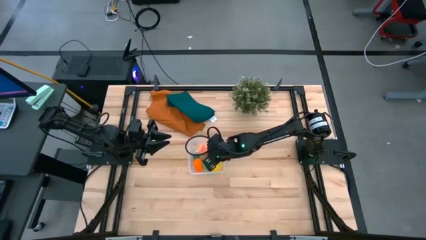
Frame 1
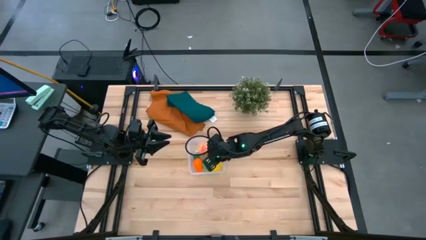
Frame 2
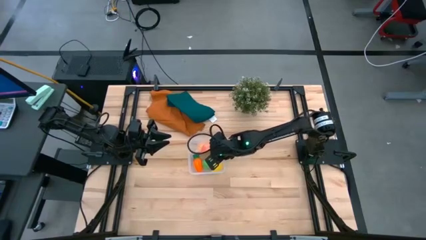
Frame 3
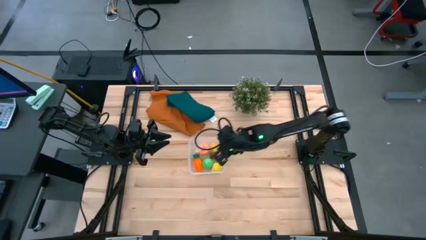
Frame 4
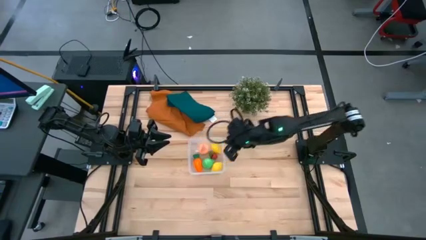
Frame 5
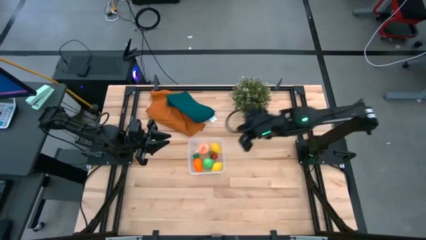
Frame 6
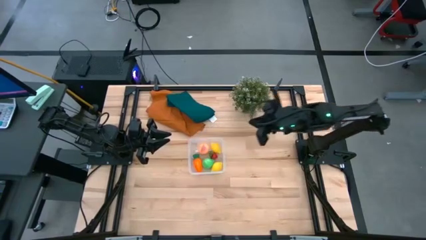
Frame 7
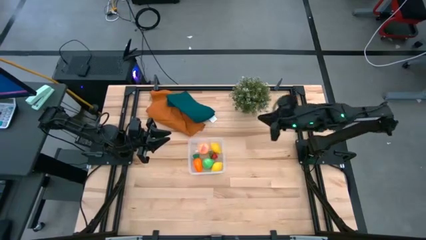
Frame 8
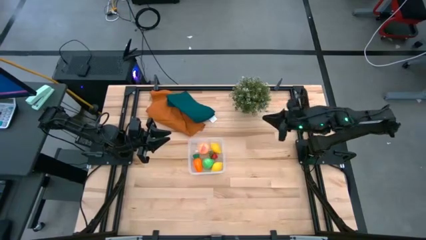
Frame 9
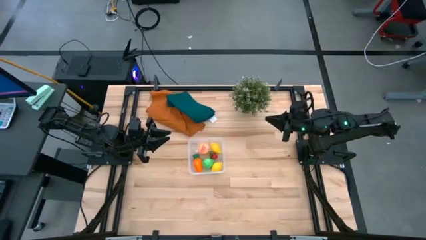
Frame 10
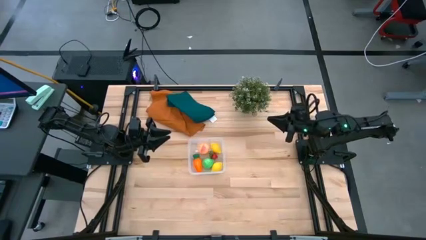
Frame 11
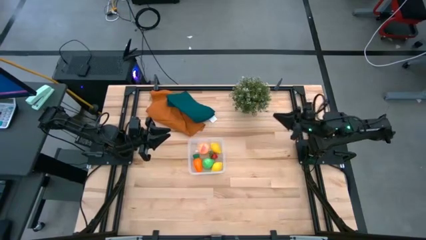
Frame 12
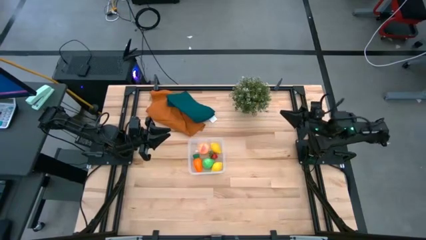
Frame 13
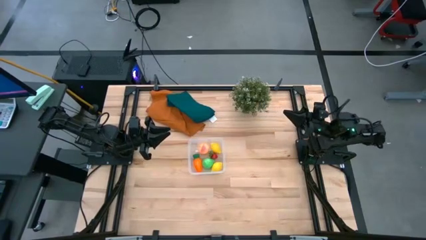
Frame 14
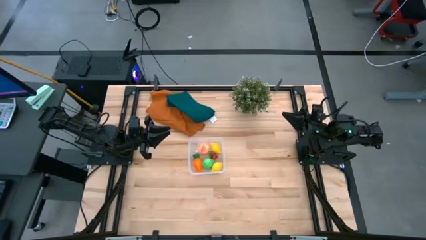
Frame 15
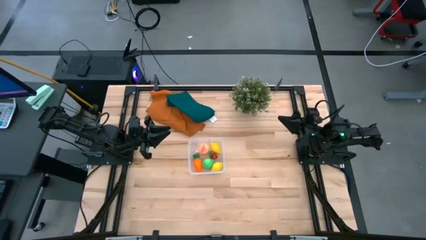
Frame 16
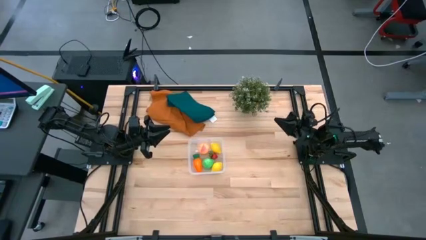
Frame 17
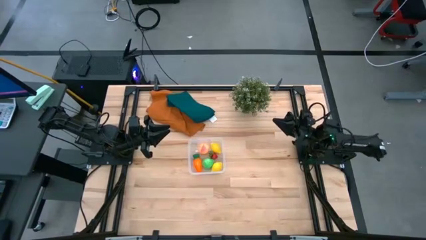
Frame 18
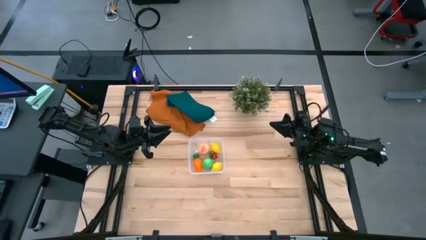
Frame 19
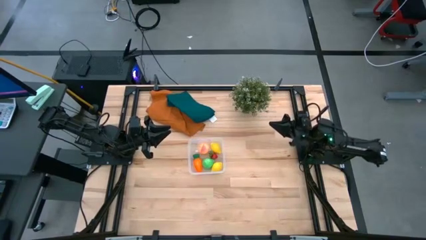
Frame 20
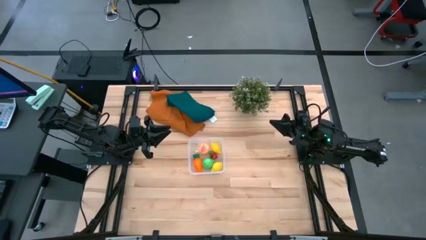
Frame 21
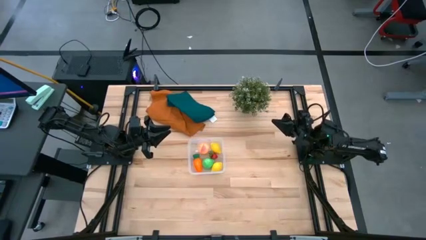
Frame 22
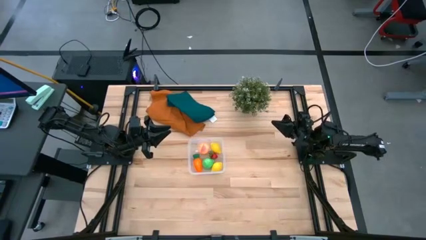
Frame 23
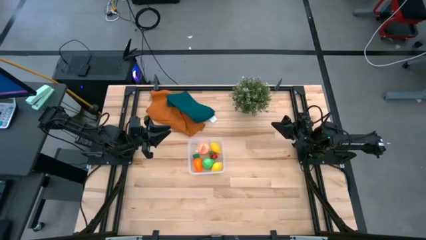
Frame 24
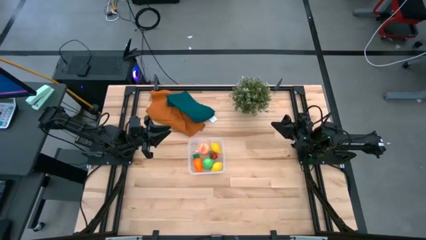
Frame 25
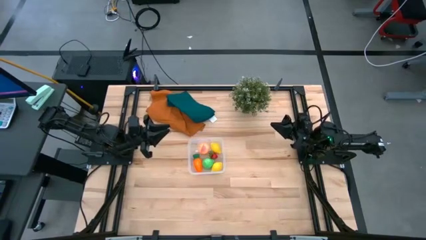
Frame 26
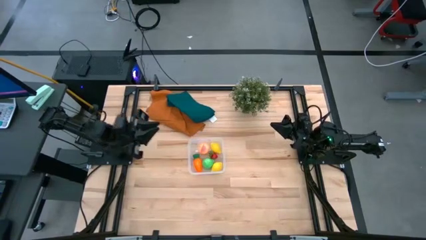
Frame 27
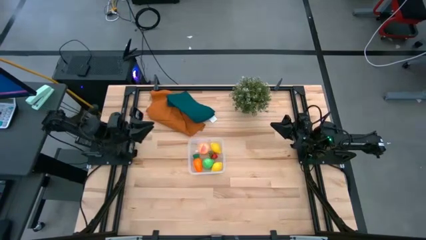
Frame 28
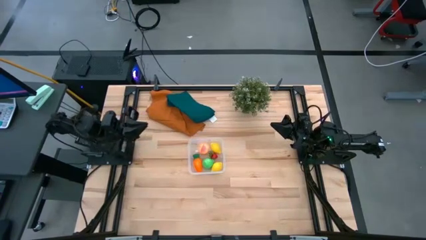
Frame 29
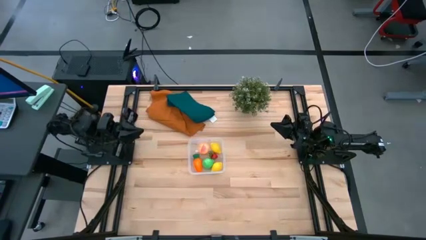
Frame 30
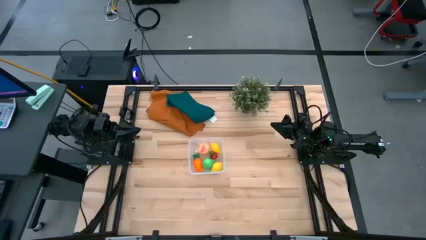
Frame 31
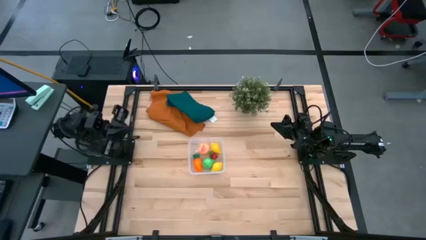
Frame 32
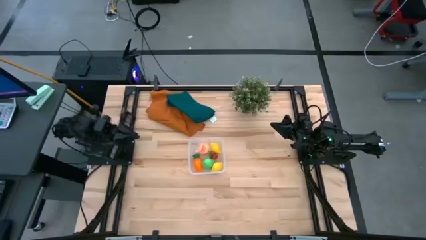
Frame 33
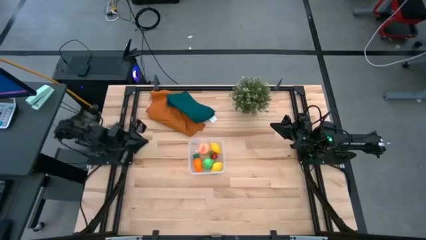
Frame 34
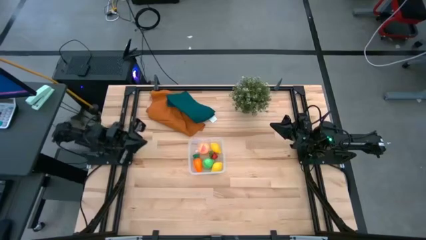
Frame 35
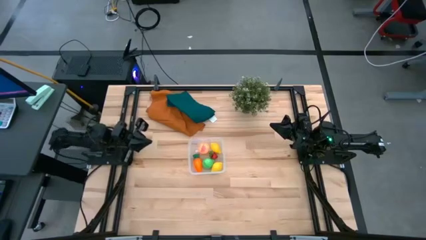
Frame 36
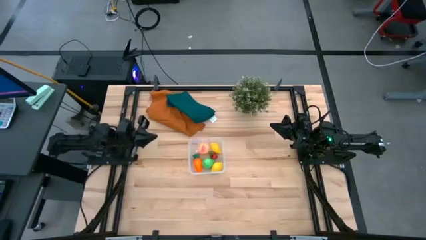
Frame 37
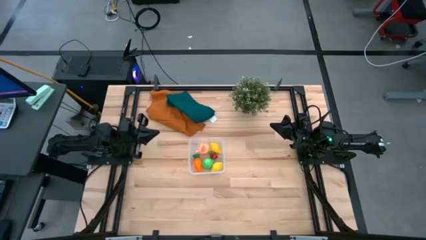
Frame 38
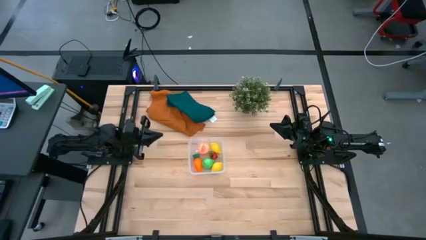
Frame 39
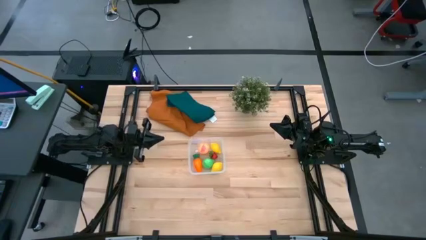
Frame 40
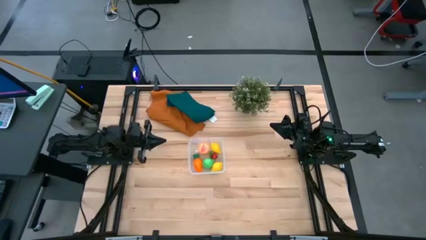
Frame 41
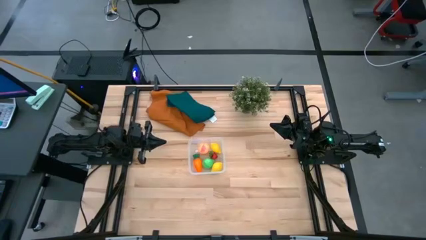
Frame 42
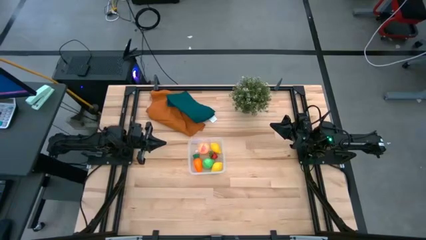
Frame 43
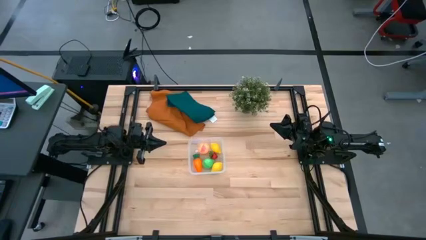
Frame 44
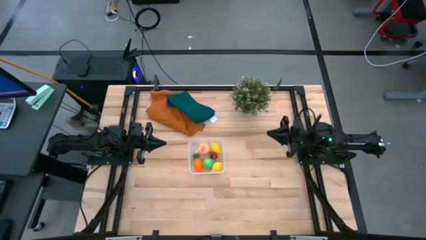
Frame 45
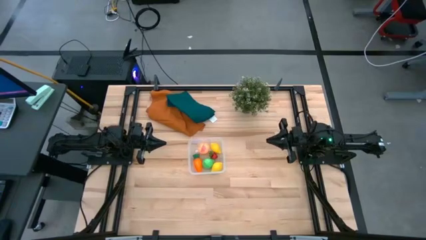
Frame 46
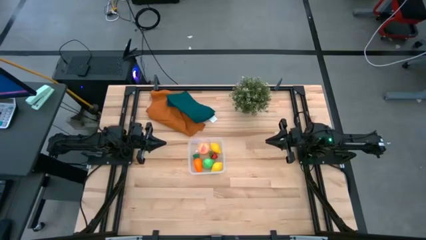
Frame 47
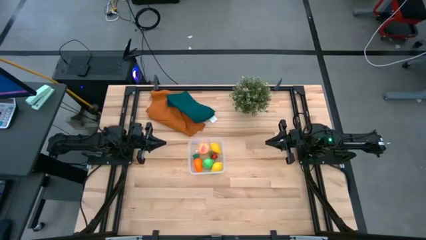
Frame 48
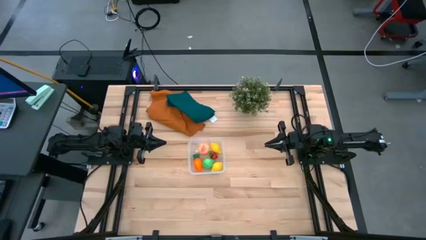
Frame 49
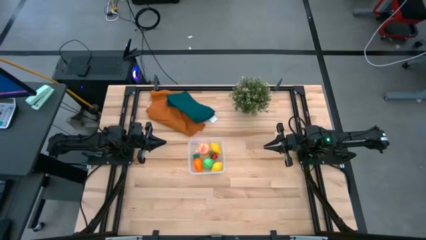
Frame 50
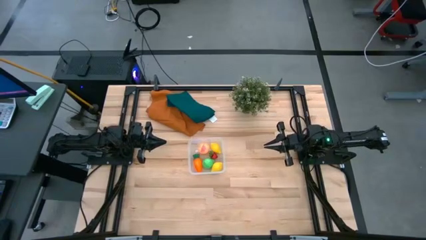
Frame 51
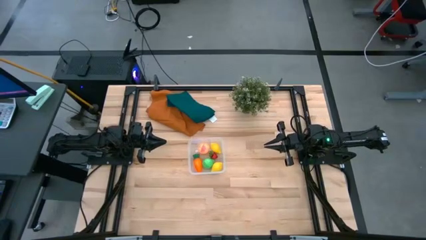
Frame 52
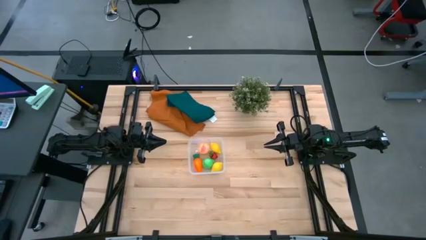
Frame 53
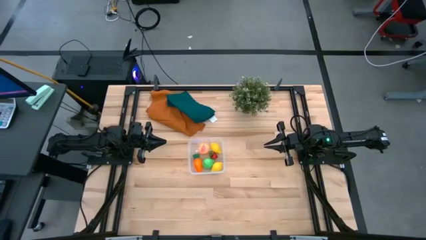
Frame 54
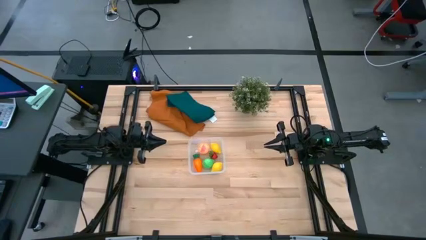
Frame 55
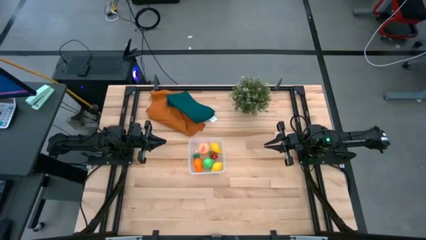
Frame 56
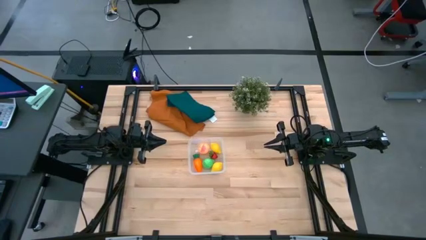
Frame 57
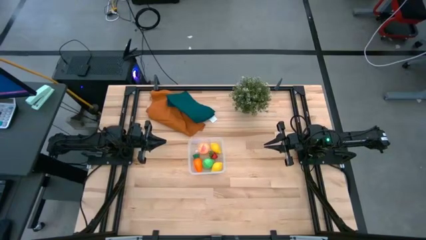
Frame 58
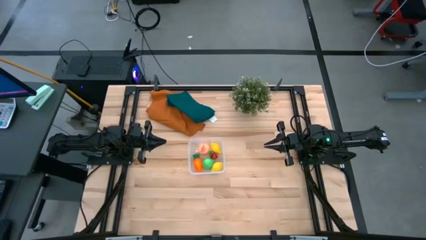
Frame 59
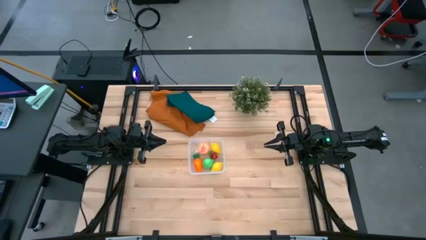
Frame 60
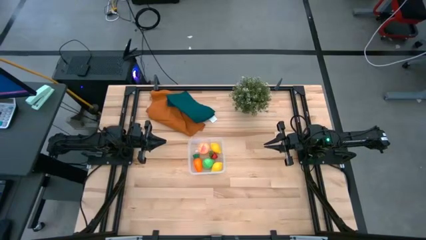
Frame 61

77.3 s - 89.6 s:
Task: Pick and placing Produce into tupperware
Return to Home Position

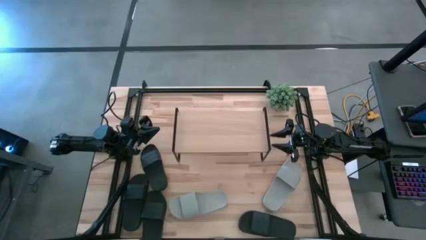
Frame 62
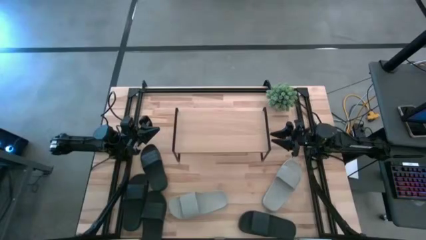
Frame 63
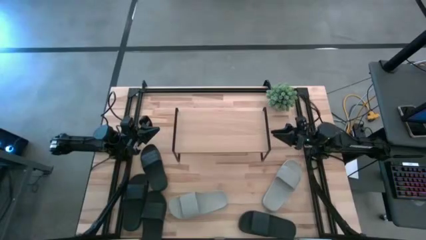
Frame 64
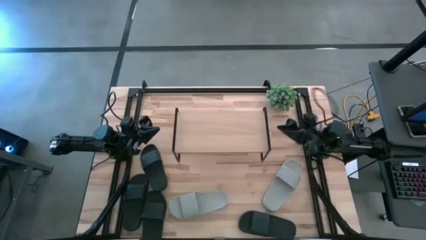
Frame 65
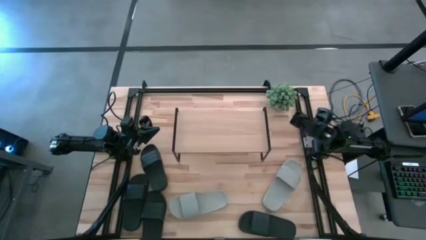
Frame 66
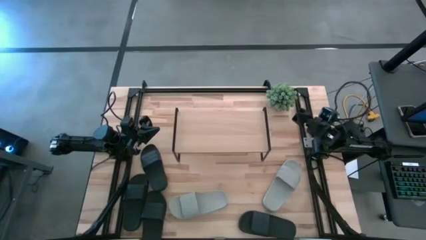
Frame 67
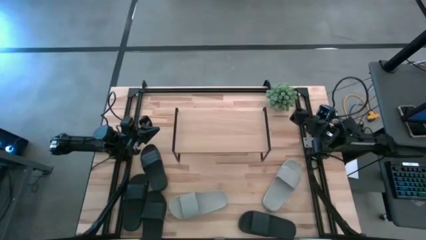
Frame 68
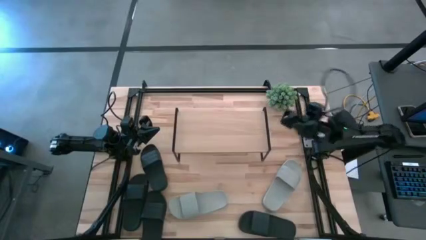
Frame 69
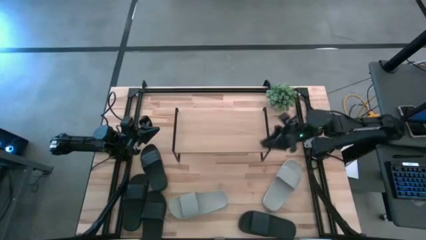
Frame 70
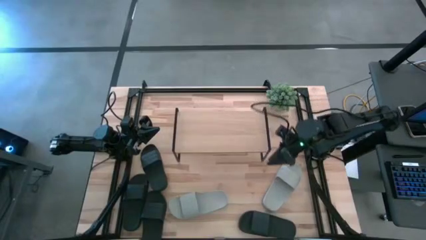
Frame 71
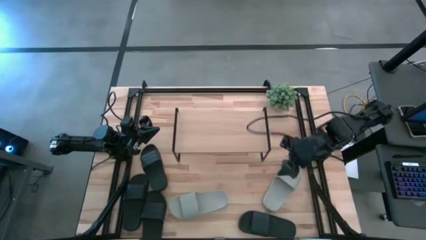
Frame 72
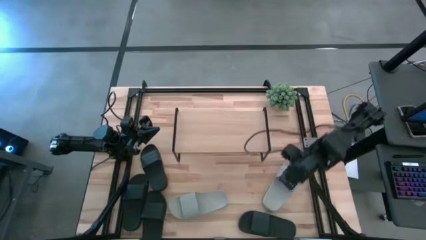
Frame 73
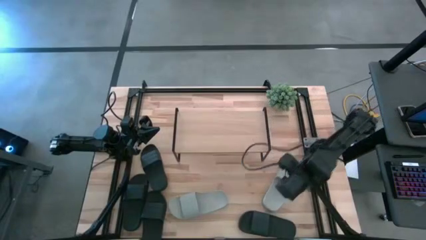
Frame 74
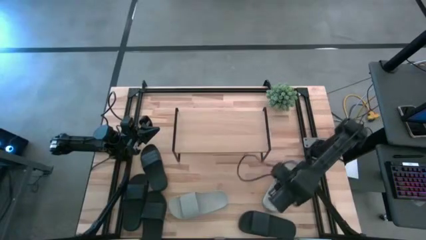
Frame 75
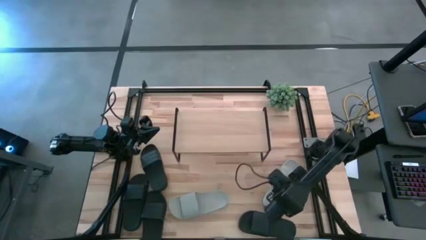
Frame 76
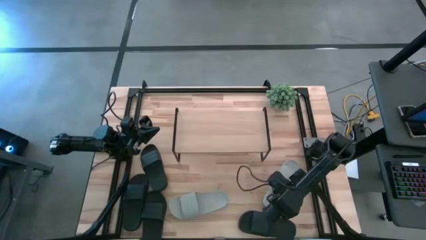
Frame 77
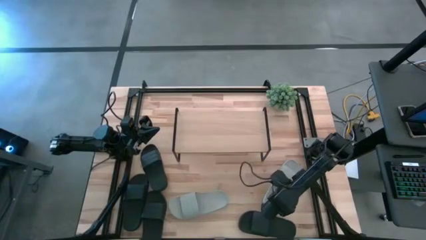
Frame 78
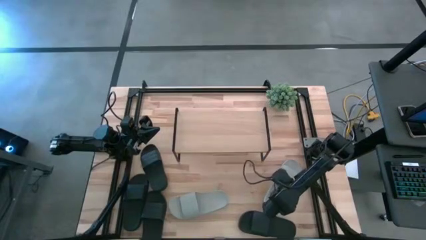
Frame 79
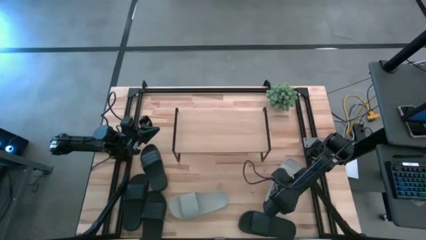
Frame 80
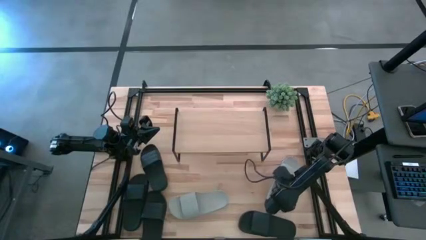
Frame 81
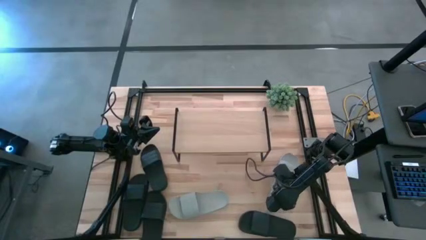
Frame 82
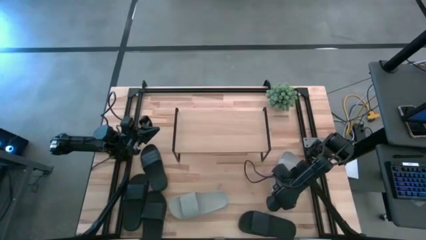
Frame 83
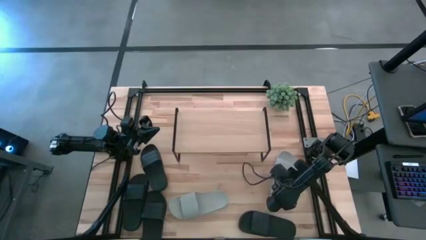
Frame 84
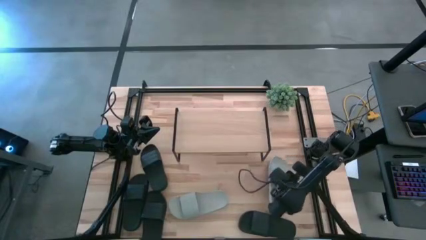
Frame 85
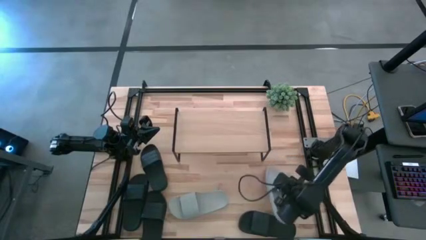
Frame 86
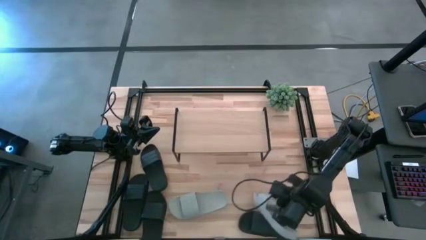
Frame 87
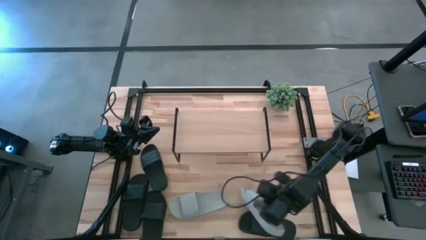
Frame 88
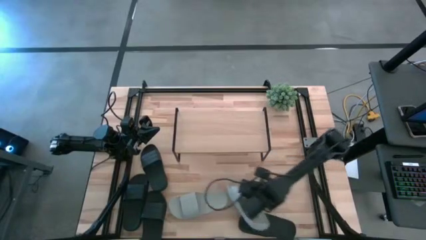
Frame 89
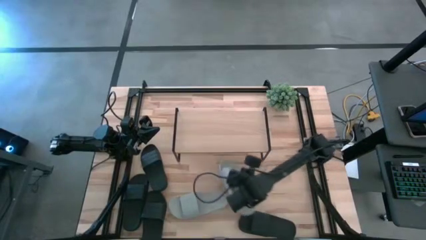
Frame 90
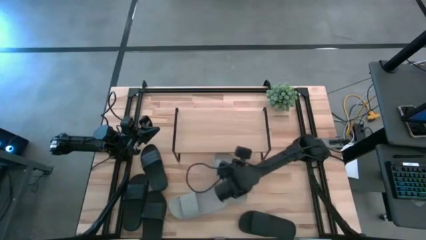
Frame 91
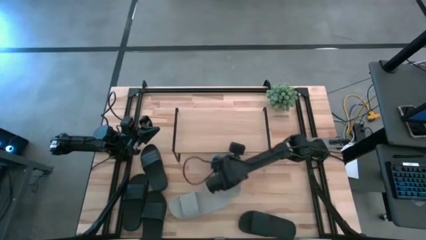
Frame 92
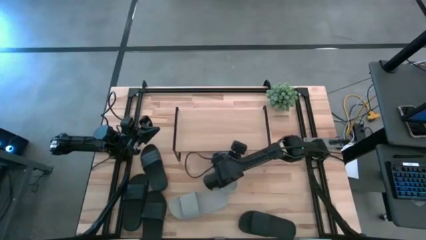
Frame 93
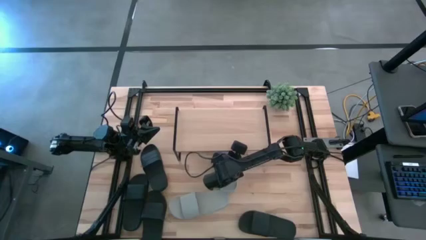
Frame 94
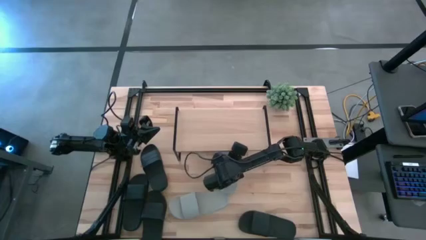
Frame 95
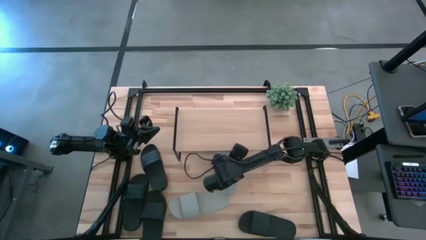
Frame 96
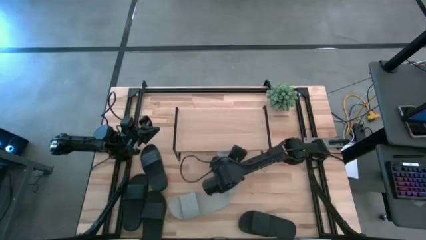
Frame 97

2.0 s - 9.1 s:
Task: Pick and place slides into the shelf
Move the right gray slipper to the middle of the table
